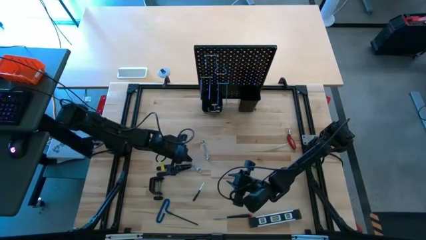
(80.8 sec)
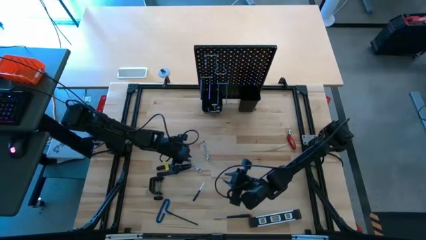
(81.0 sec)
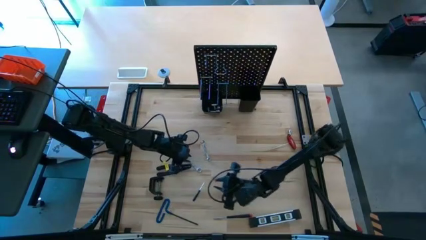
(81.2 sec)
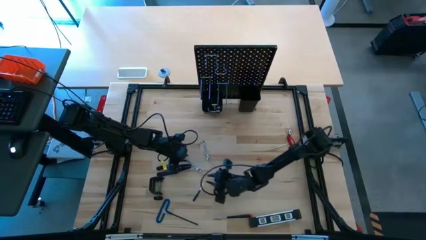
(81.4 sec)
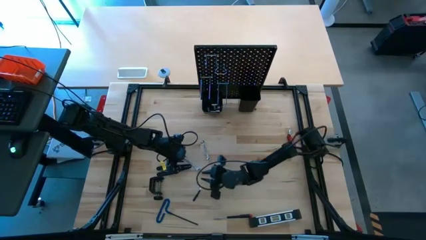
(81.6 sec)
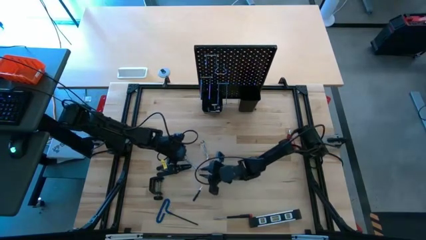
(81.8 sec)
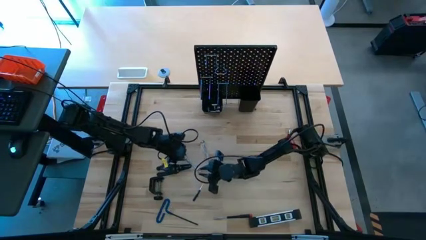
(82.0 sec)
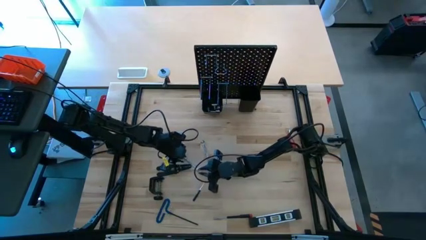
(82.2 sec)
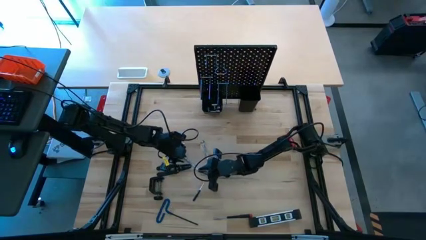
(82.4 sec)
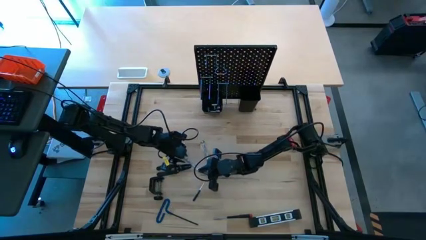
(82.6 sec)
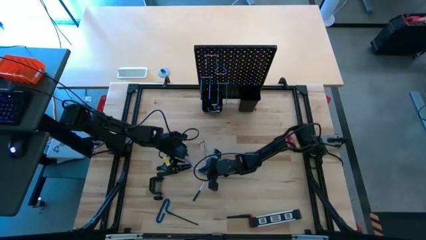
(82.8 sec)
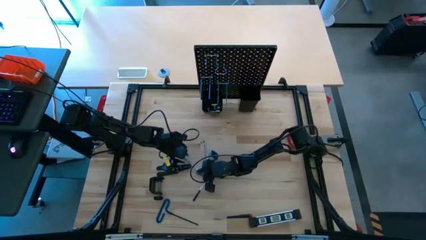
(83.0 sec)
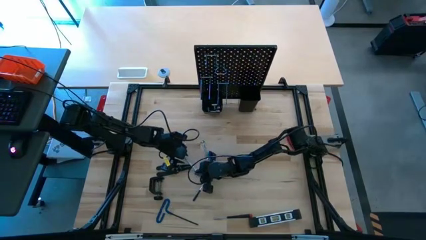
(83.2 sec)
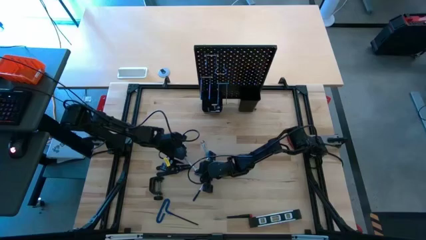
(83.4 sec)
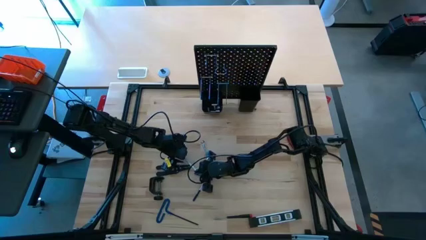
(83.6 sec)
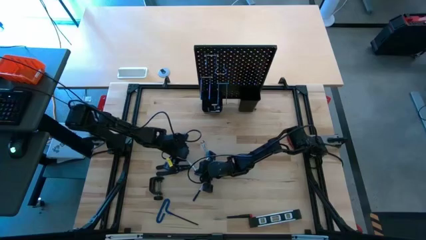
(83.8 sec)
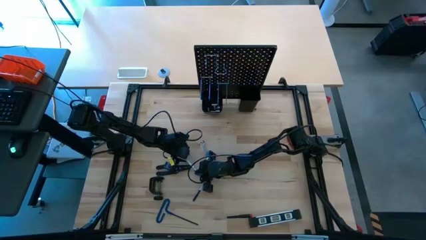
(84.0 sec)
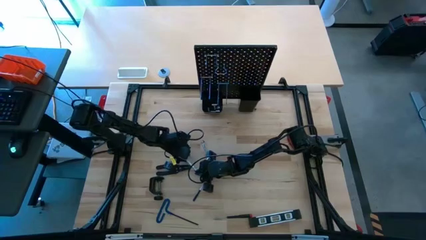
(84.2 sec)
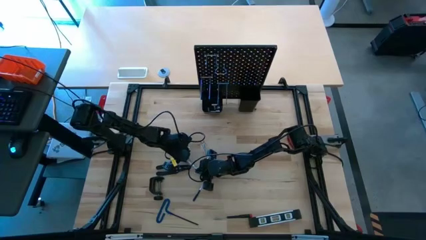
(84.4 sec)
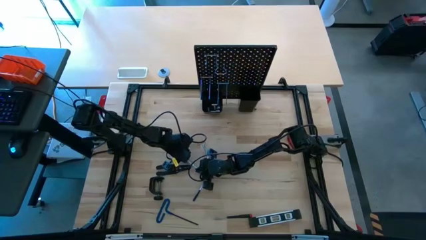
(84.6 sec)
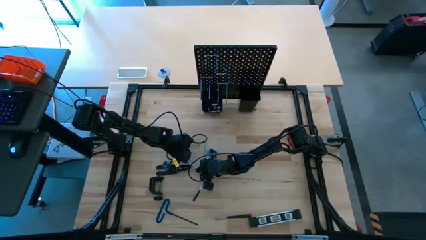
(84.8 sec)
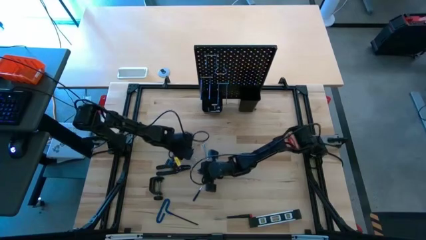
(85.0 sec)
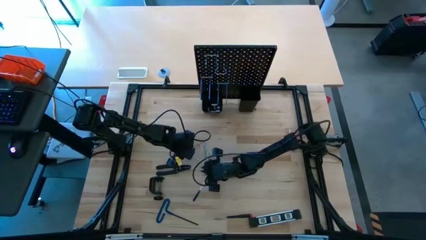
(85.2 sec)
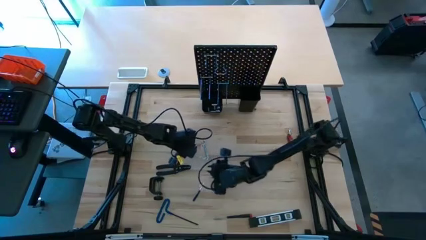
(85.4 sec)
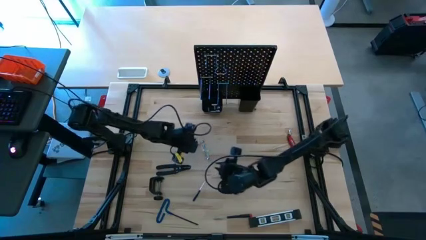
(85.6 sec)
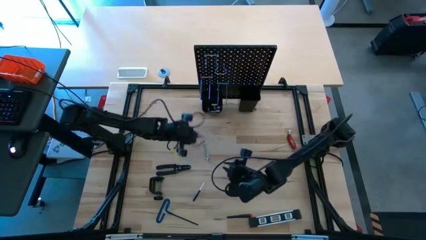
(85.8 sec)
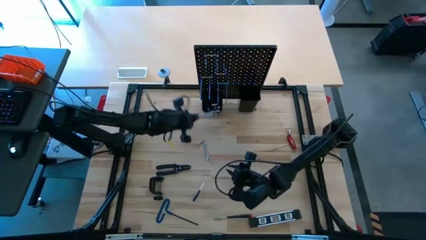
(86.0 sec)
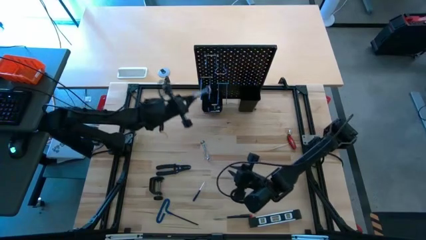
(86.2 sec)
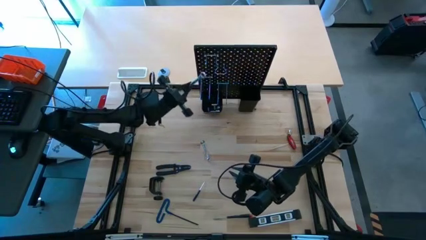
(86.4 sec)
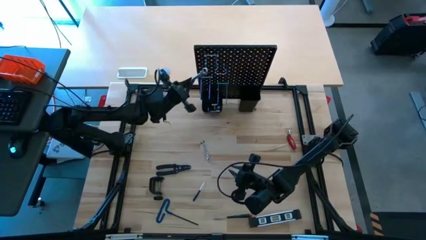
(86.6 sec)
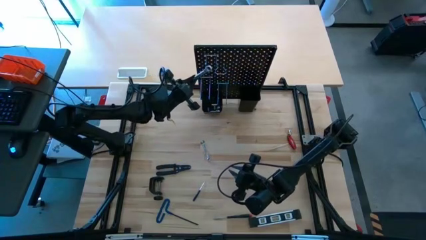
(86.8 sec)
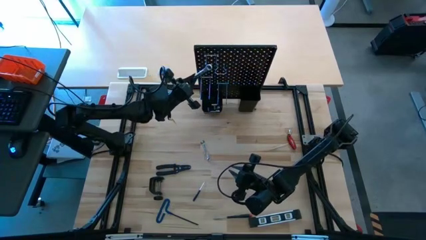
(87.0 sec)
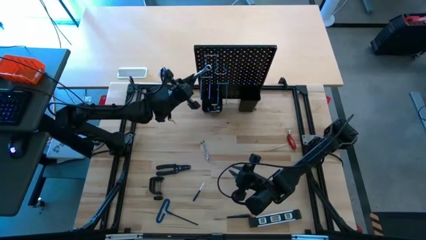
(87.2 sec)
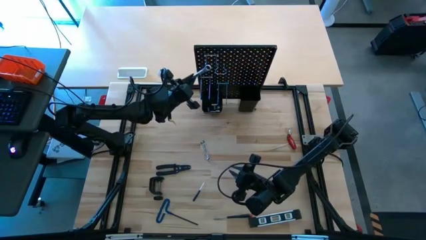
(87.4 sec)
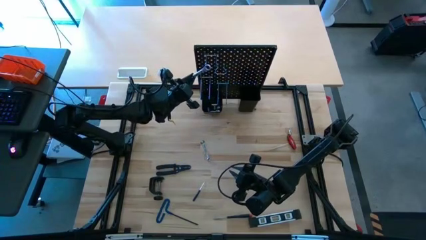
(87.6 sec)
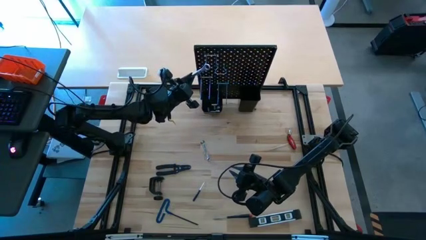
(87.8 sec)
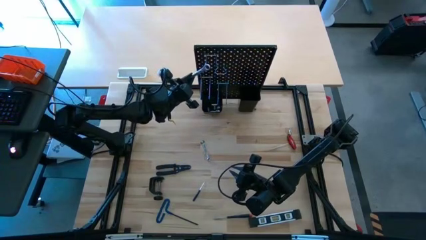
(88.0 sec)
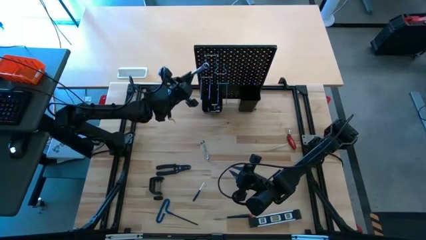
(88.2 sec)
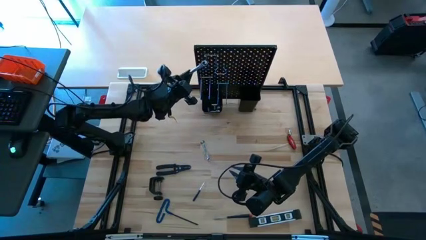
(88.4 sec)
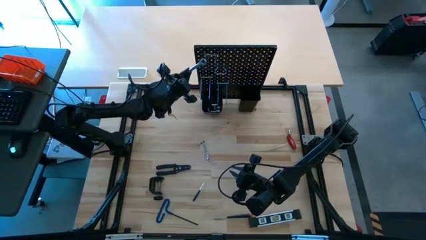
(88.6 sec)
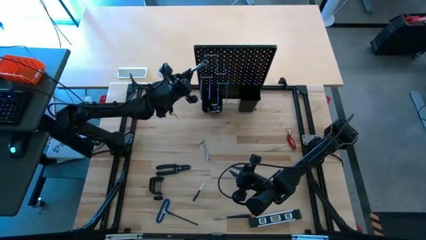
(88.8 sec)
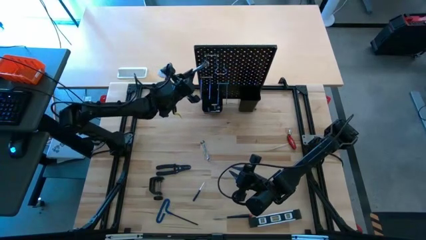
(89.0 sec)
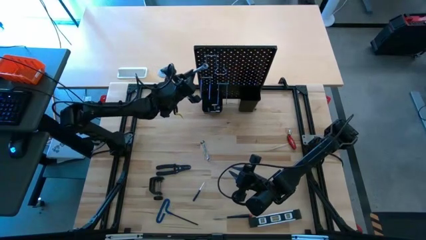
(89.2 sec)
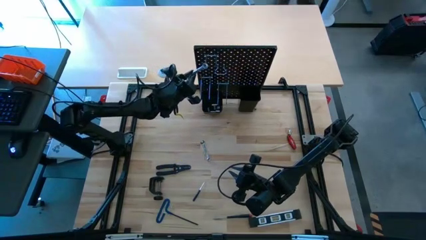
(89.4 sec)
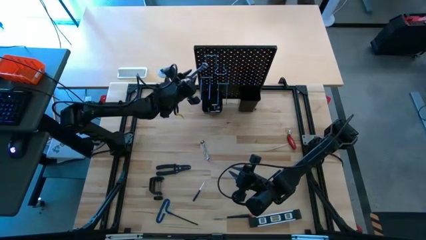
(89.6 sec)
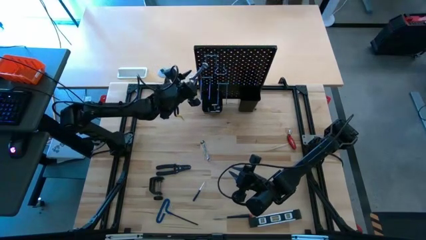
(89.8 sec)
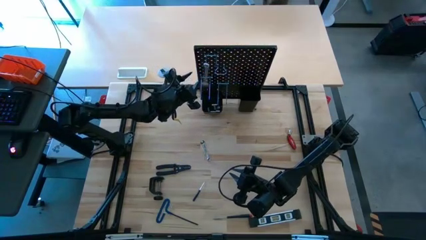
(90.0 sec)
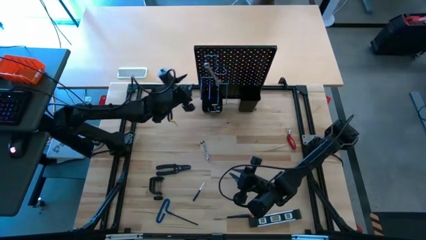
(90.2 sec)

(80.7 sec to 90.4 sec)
Task: Hang tools onto peg board
Hang the wrench onto the pegboard

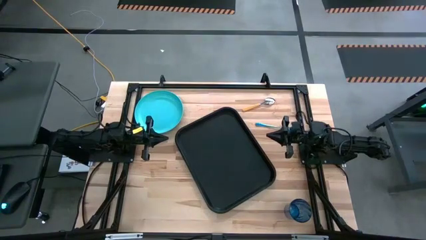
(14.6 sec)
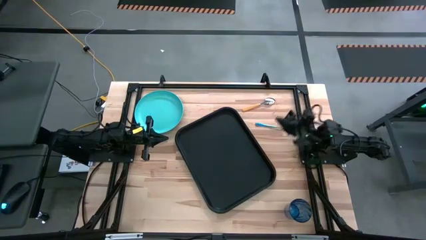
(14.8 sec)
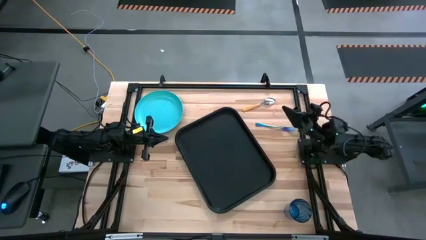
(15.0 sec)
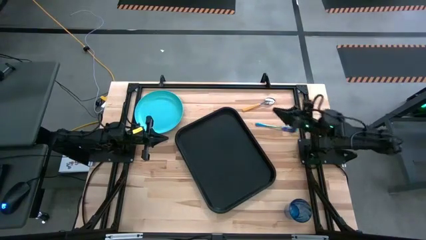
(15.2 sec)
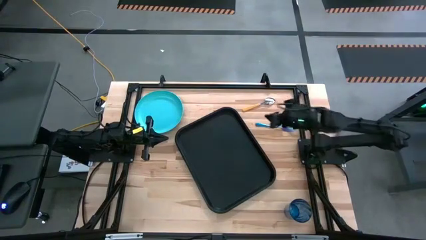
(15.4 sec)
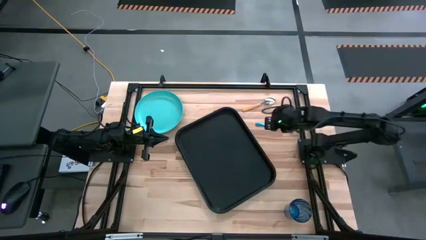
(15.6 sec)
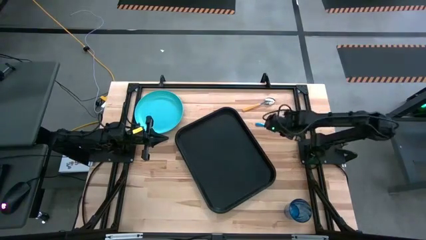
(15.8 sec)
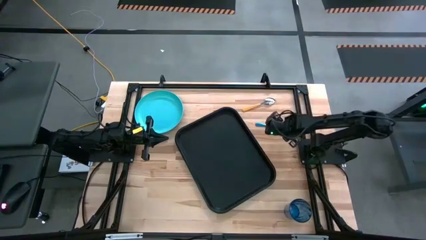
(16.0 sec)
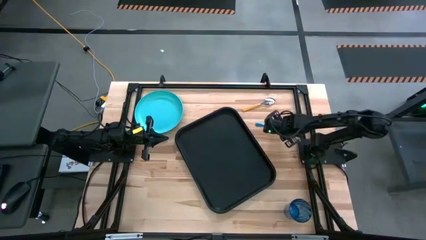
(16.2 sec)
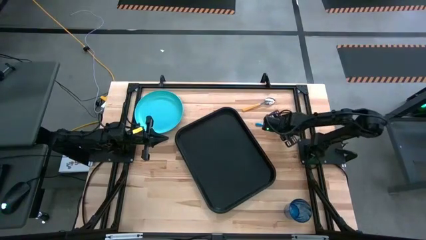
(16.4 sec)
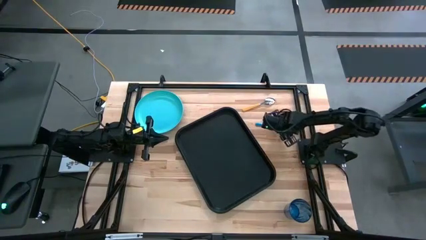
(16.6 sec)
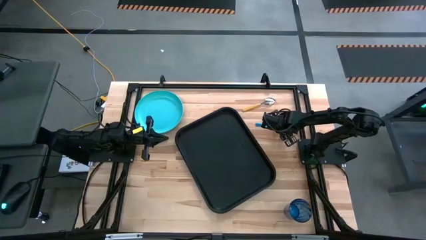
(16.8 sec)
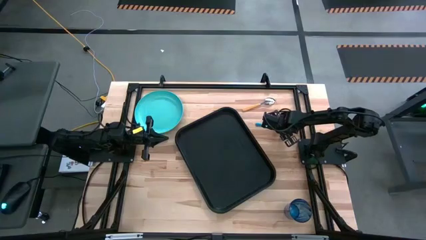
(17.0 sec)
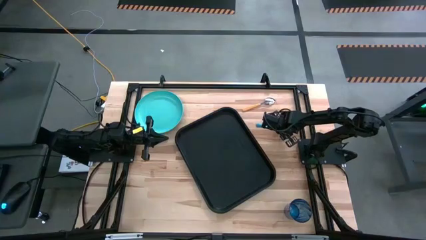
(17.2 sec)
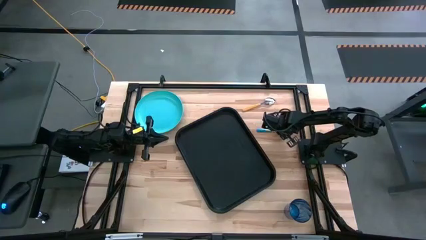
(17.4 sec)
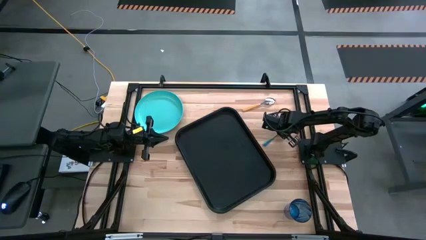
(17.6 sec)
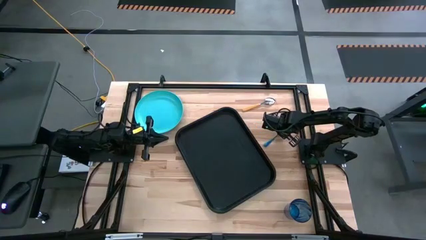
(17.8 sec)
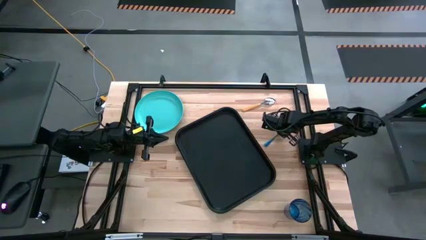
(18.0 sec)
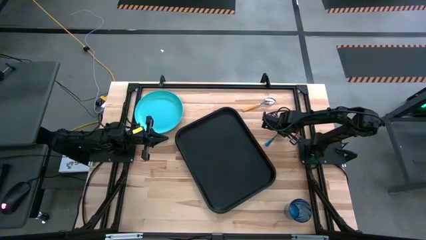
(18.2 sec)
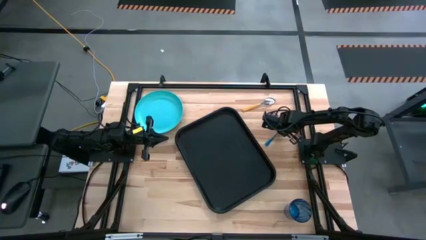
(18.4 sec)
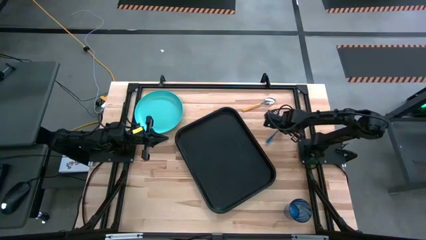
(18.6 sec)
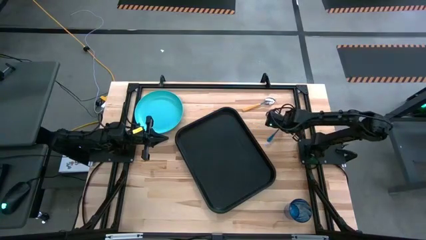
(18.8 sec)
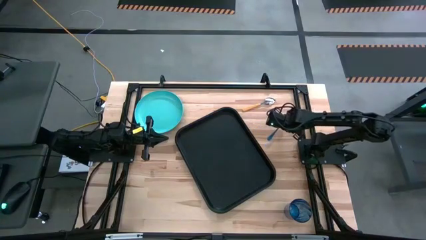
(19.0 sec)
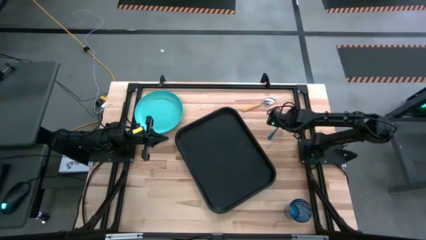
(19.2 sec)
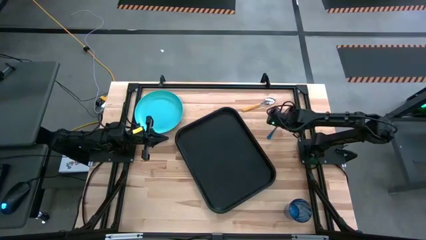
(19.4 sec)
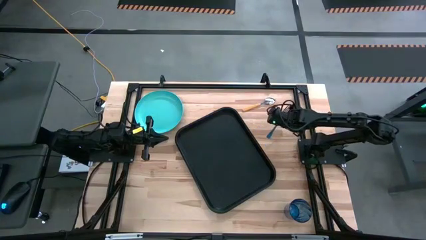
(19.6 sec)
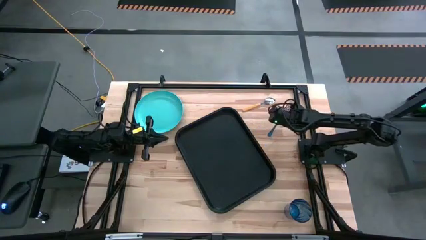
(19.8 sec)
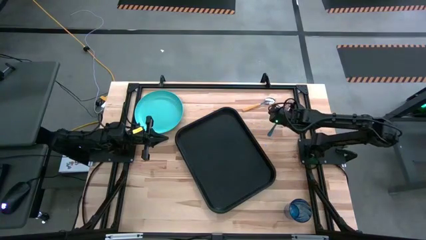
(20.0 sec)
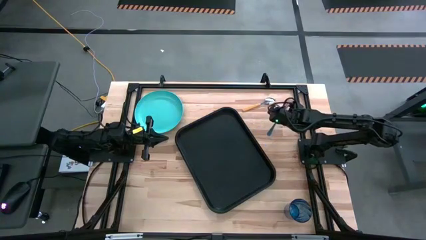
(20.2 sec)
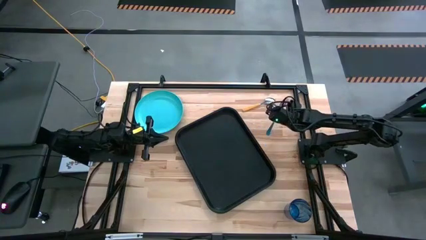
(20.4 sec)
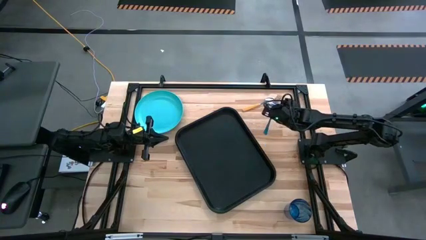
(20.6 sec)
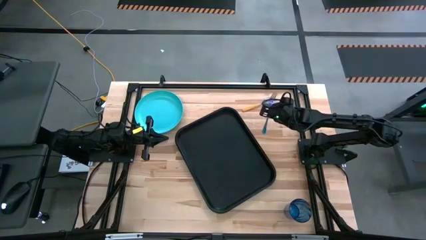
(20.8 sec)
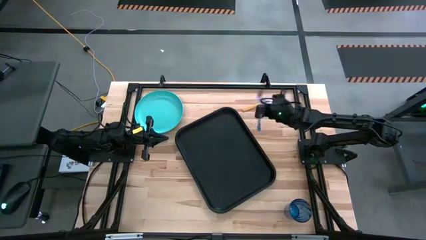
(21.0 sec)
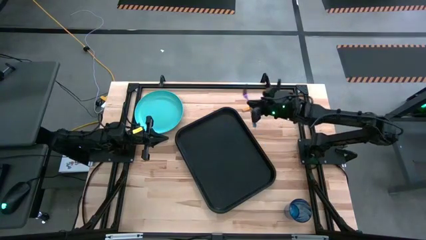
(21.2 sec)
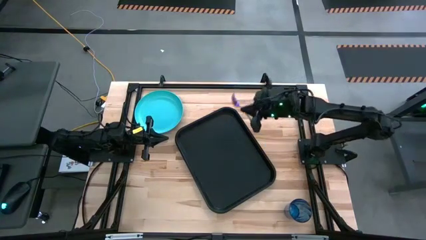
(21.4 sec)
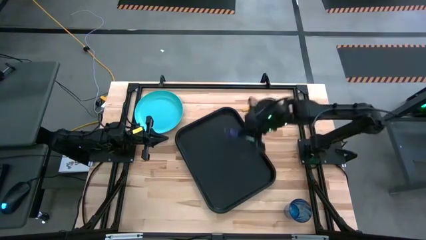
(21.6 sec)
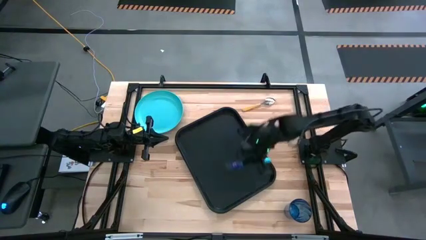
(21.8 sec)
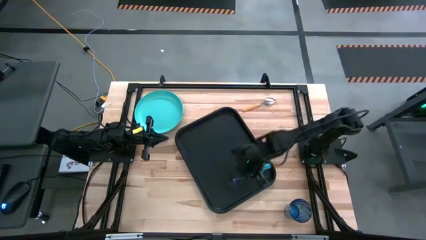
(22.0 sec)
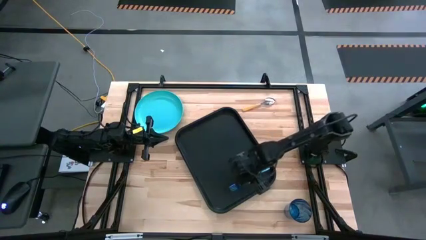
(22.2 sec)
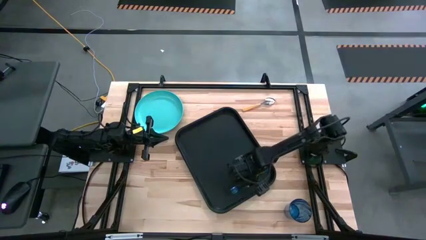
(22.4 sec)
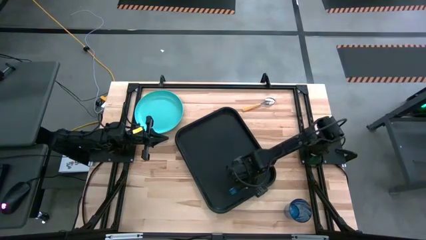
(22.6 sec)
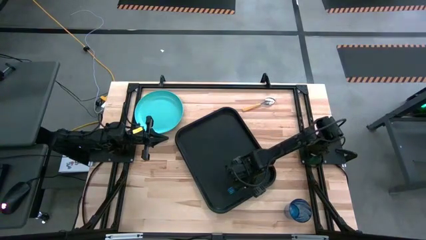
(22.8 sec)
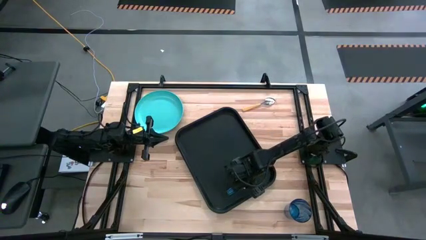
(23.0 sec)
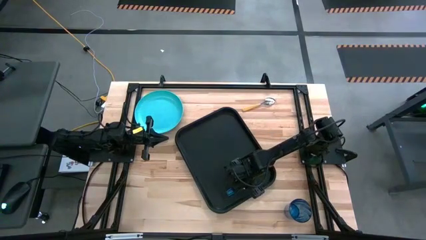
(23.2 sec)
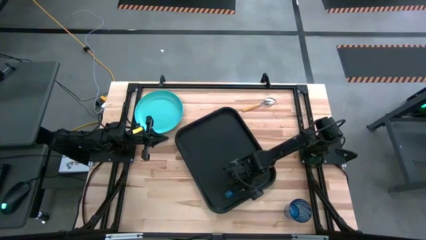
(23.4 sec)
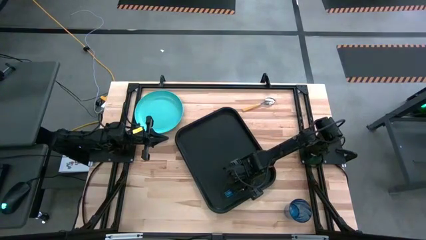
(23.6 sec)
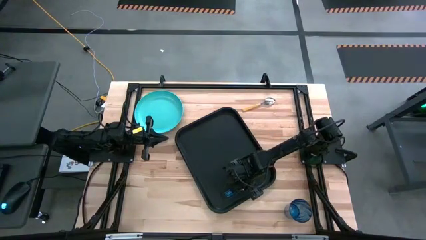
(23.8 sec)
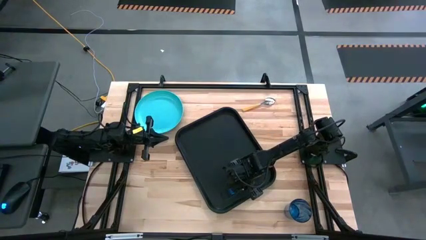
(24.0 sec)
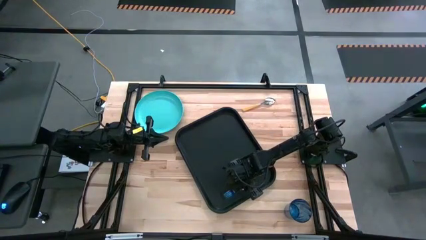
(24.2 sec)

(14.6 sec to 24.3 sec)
Task: Pick and place plate/cup/fork/spoon on tray
Put the blue fork on the left of the black serving tray
